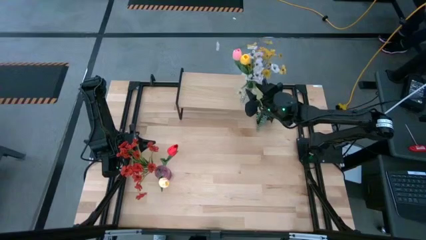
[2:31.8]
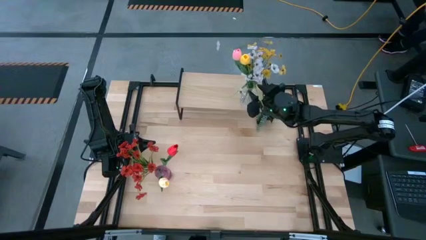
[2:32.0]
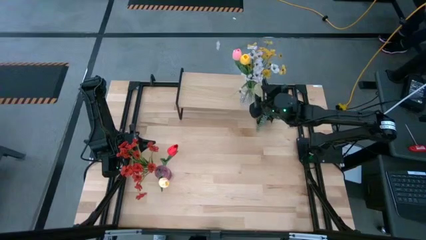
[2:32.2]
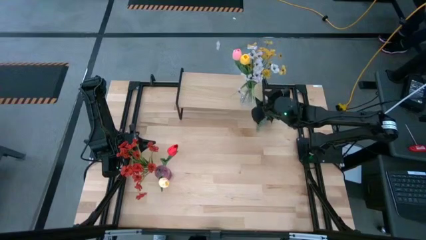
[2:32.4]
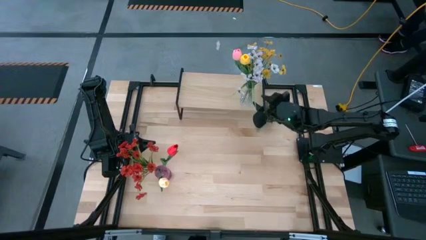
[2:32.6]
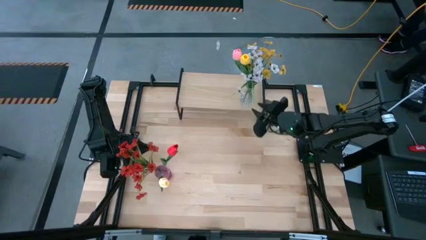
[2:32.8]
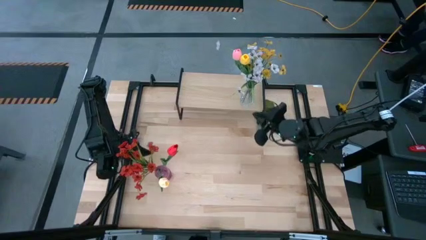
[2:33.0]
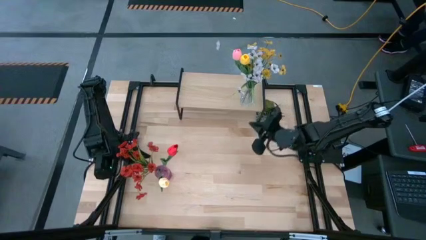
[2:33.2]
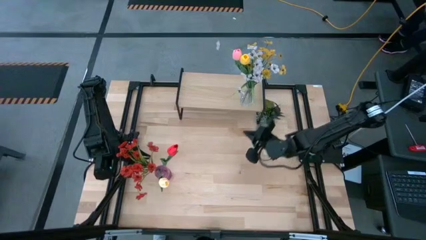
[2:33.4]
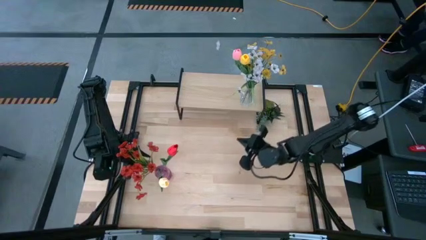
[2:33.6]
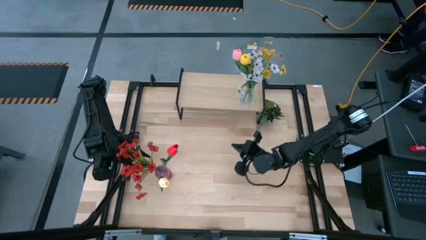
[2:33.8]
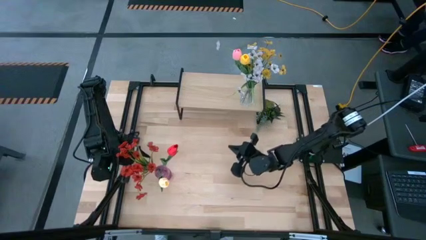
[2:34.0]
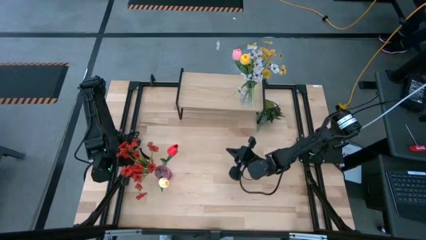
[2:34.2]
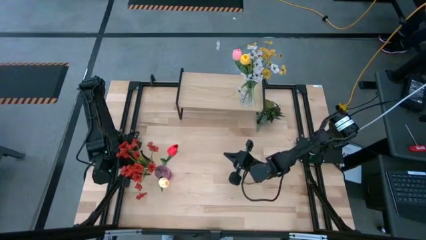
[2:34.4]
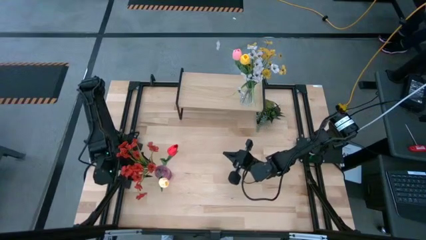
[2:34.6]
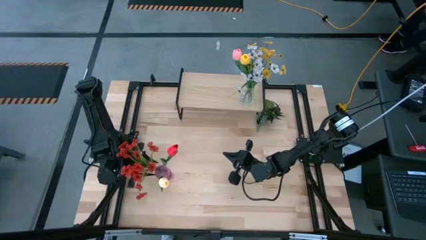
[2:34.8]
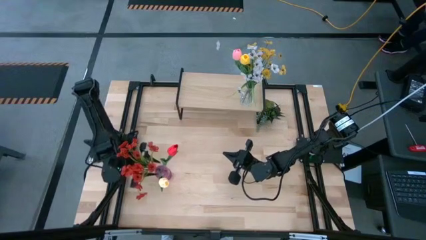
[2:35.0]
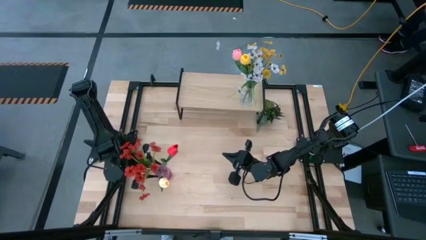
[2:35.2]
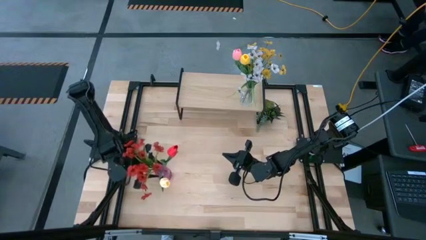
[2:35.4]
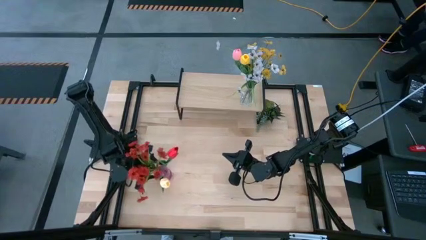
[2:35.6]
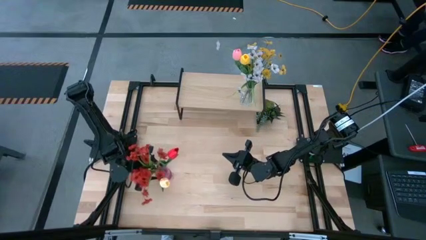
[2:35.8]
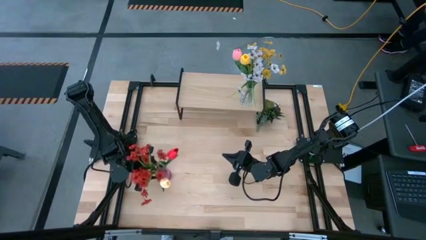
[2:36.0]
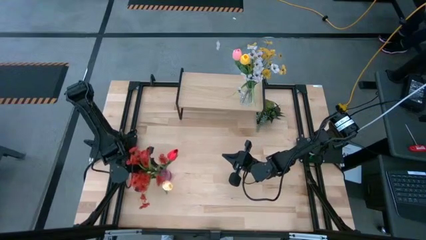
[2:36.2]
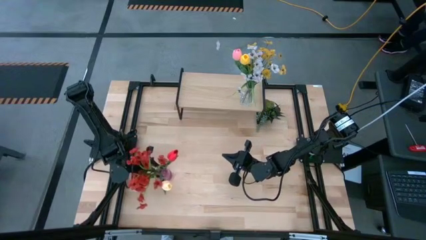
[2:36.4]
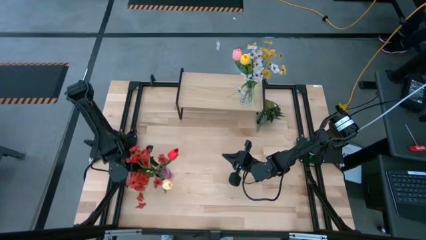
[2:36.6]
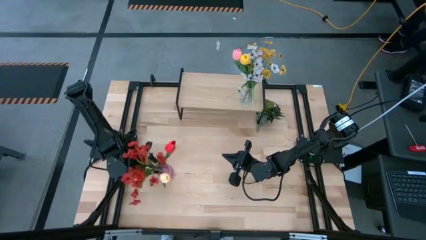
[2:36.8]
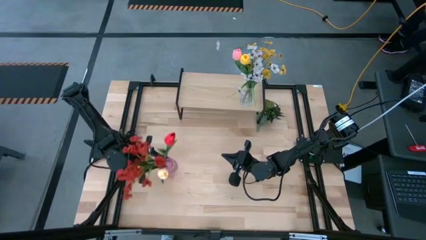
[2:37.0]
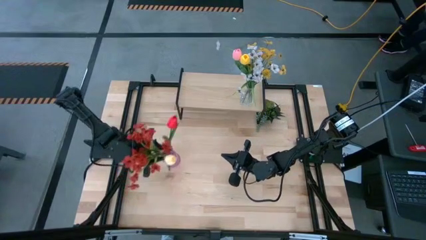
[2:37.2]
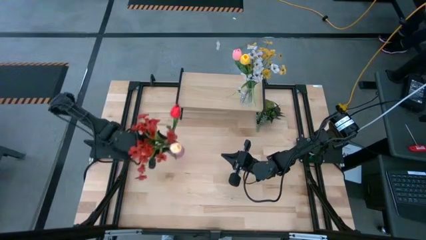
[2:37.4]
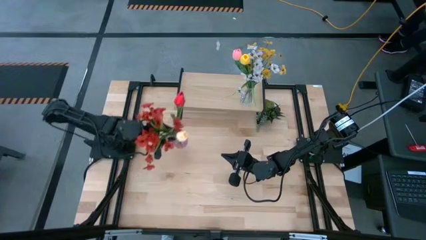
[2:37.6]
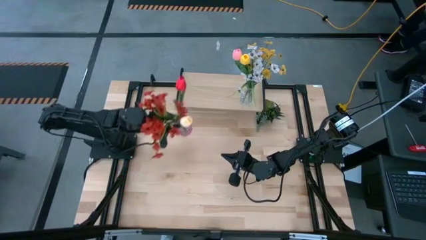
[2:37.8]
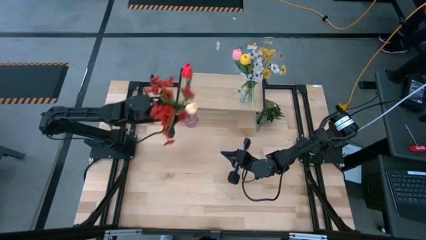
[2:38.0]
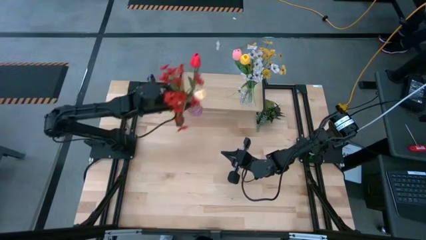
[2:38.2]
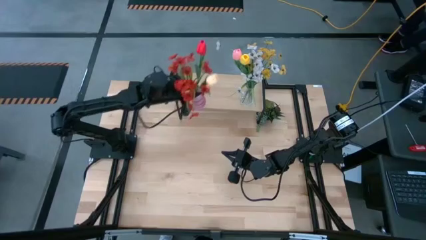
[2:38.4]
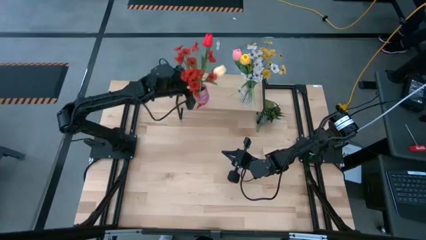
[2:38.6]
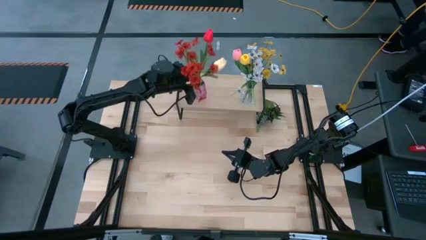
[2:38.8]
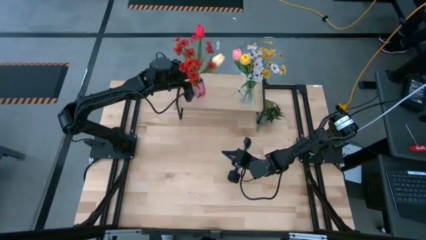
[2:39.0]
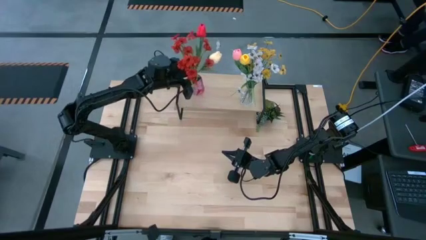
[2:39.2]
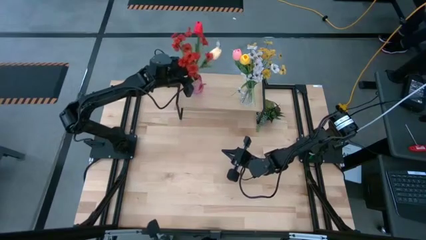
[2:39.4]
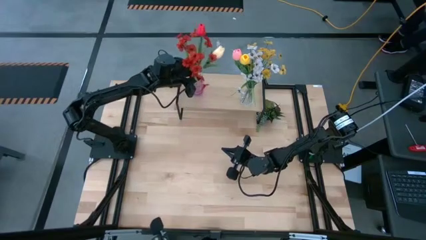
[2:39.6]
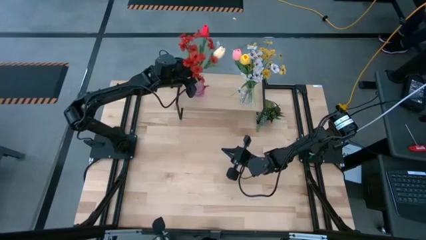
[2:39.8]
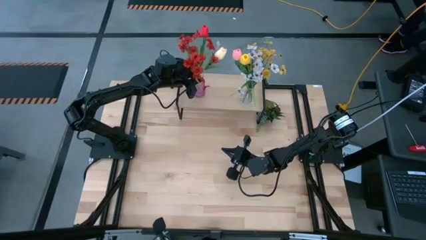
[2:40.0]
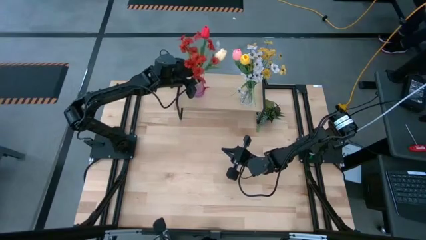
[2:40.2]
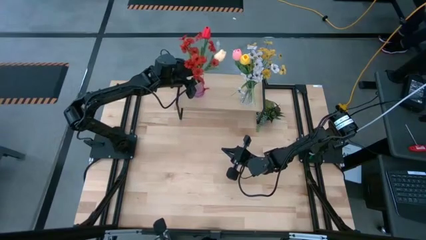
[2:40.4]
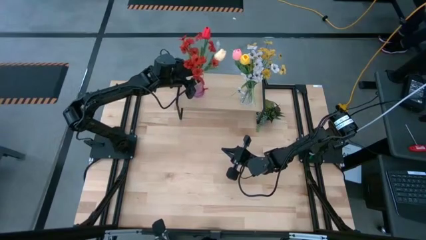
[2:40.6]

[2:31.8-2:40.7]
Task: Pick and place flowers into a vace then onto a shelf
Put the violet vase with flowers on the shelf

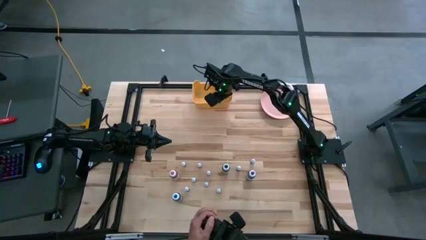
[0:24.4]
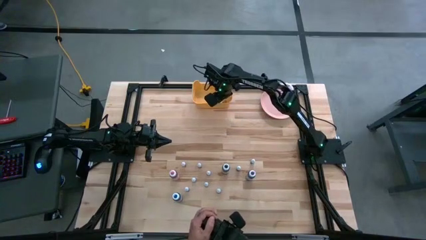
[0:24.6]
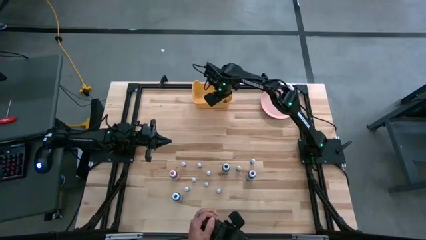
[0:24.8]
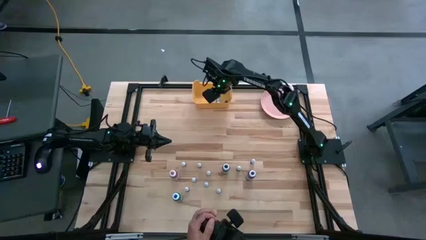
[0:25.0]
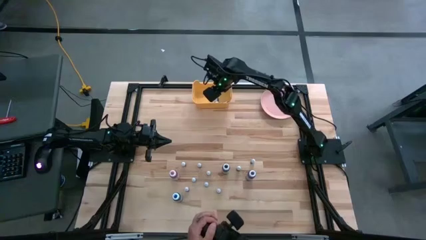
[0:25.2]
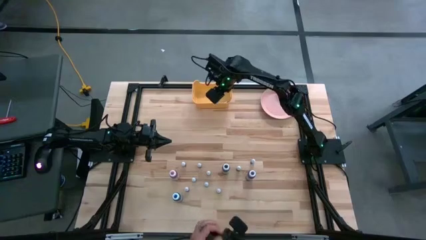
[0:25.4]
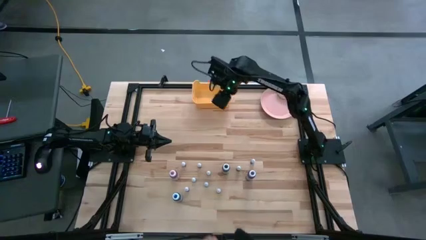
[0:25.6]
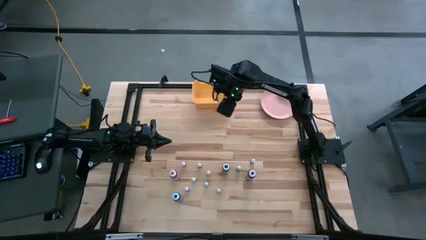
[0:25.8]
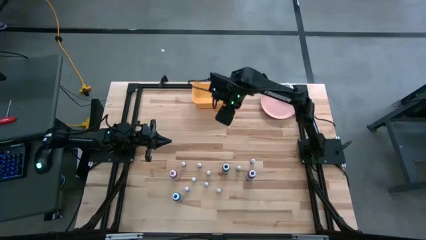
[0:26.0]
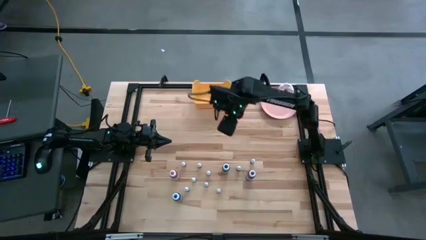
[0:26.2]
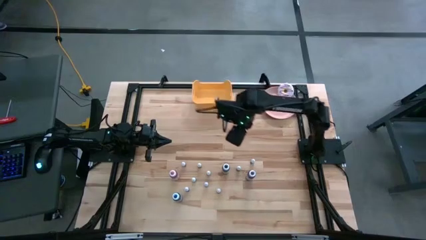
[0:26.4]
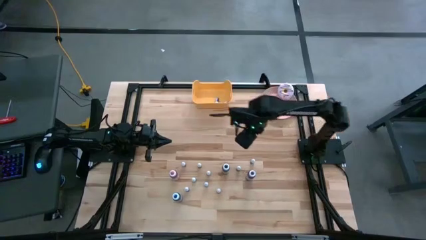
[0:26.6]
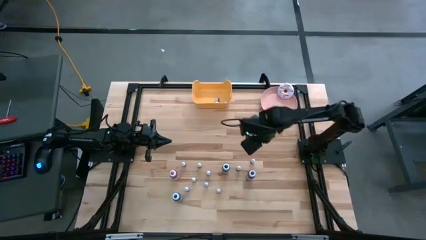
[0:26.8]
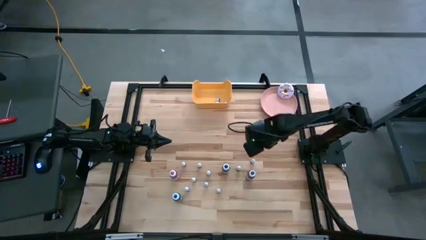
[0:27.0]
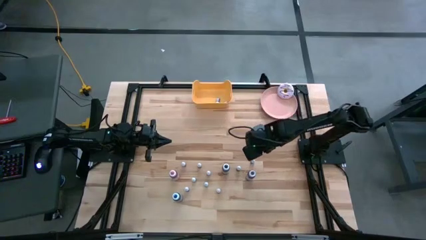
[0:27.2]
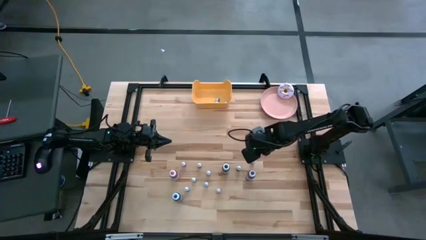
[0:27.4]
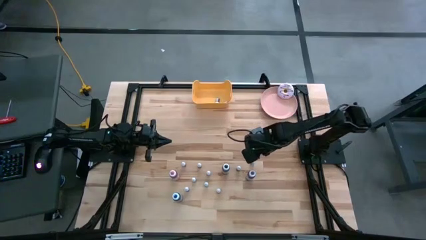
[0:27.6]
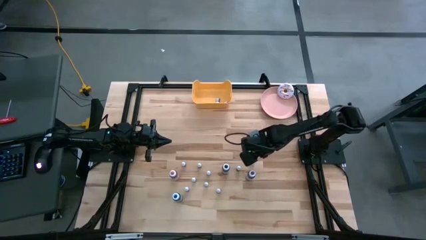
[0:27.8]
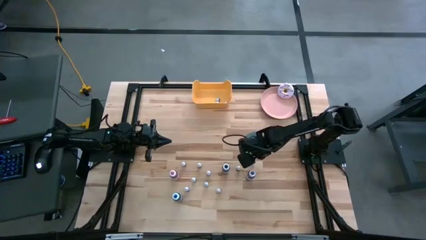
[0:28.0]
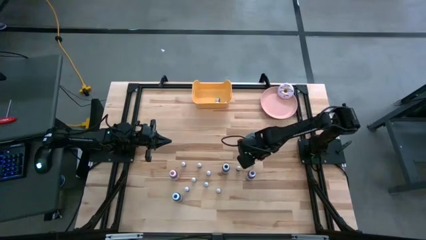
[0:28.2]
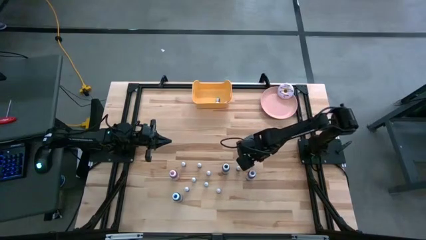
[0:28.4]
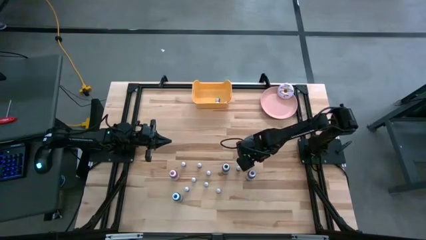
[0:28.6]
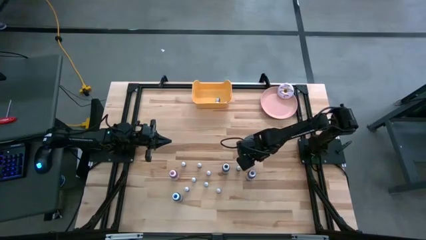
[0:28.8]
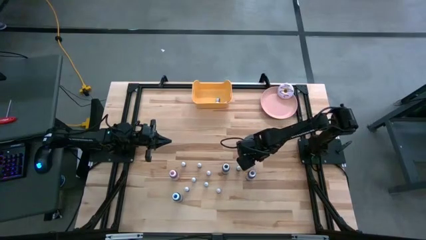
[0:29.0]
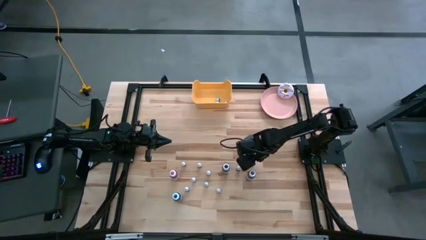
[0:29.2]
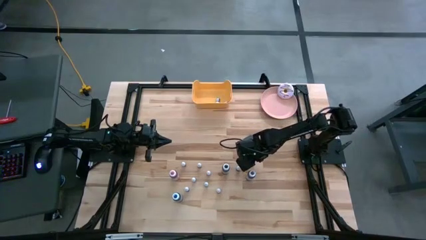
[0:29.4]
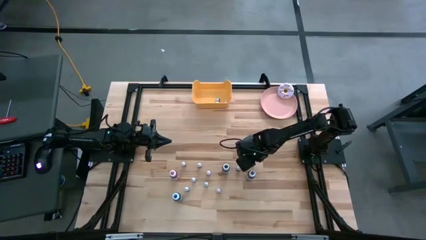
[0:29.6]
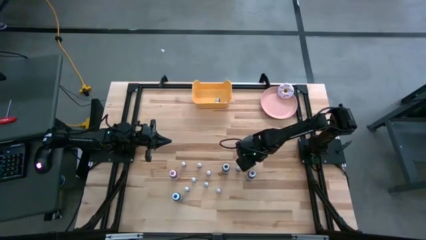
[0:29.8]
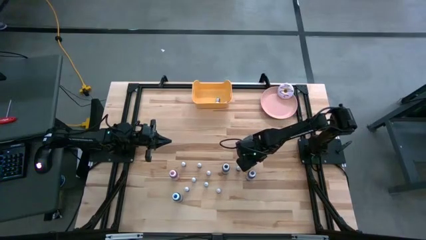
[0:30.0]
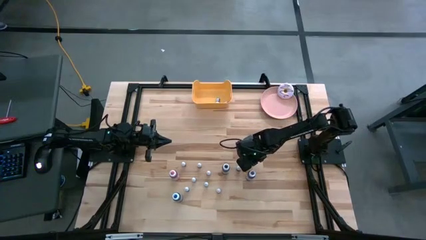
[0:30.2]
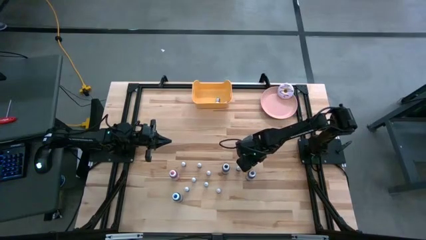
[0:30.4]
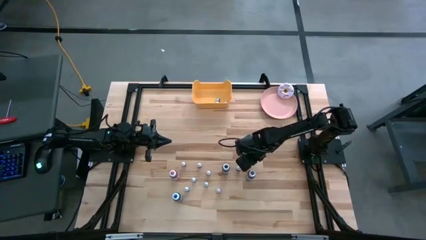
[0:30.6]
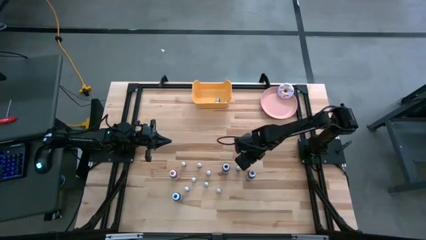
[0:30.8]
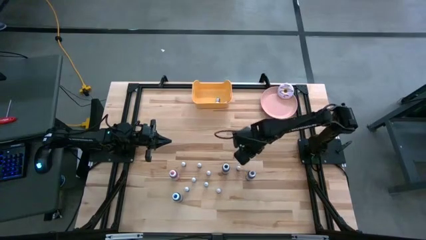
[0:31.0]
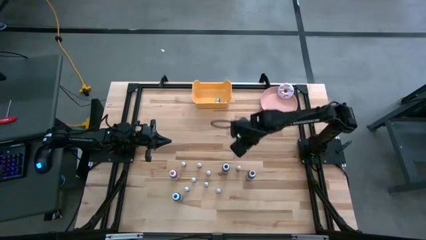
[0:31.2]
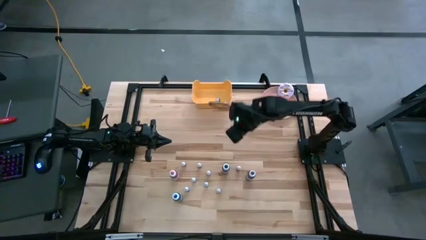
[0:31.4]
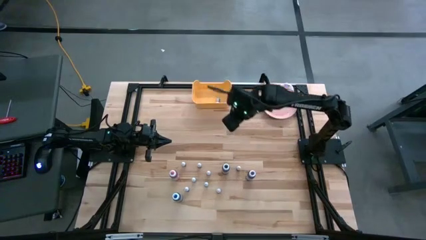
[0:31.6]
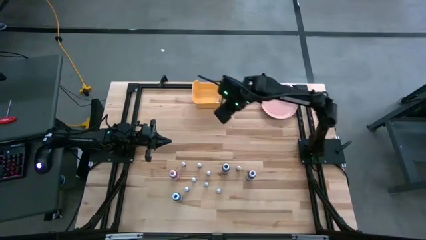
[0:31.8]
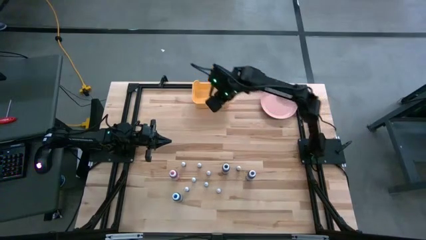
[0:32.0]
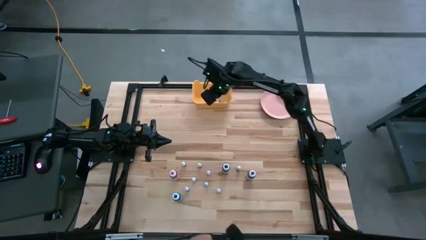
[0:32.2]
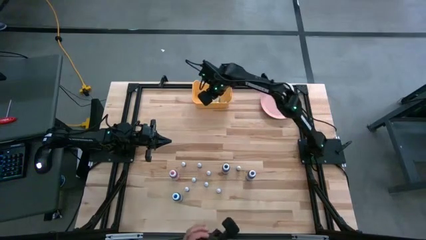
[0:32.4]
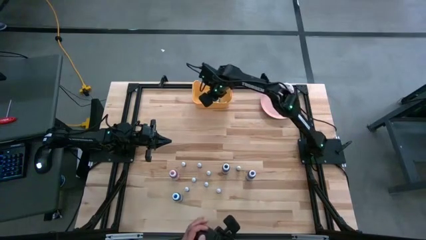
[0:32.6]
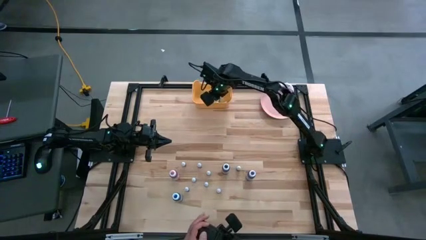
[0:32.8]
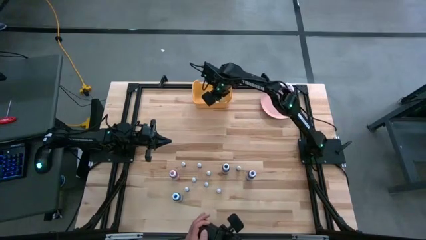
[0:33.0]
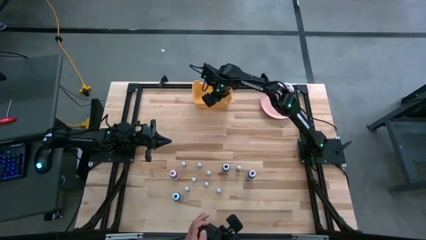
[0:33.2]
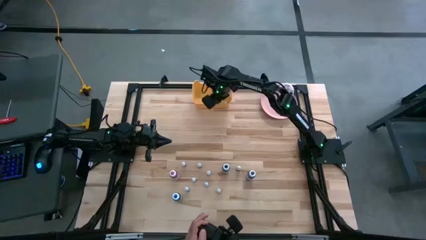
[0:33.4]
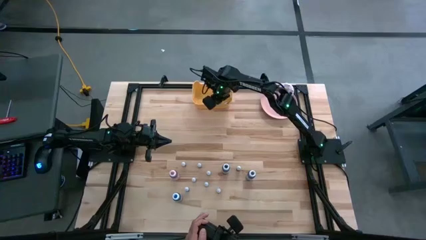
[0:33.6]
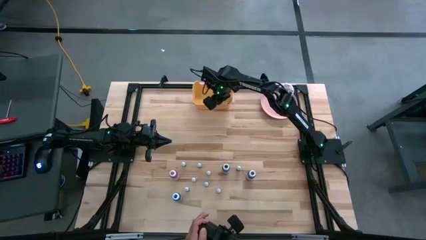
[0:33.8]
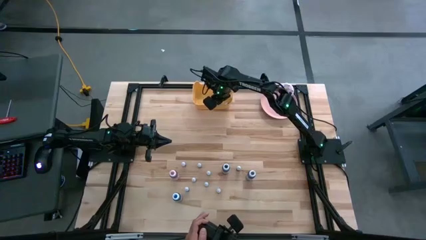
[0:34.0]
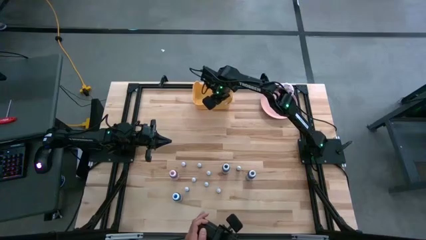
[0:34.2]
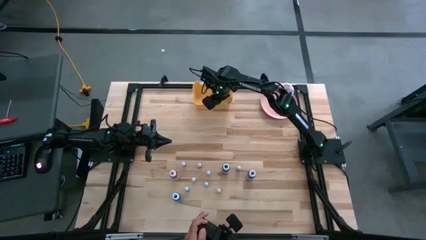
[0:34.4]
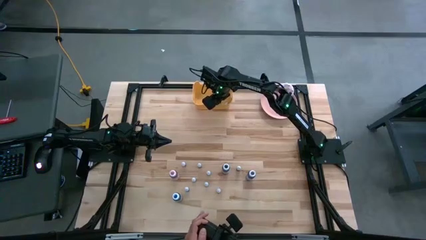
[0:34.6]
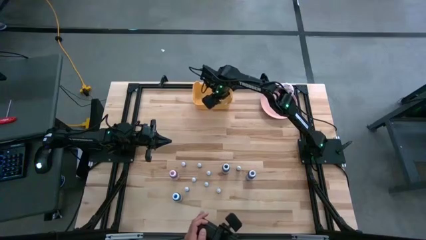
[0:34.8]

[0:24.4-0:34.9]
Task: Pick & Place food coloring
Put the small black food coloring bottle into the yellow bin
